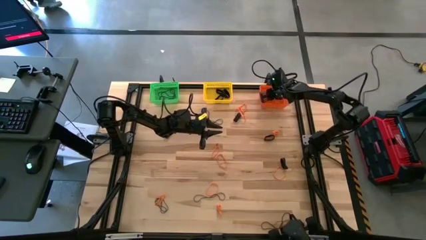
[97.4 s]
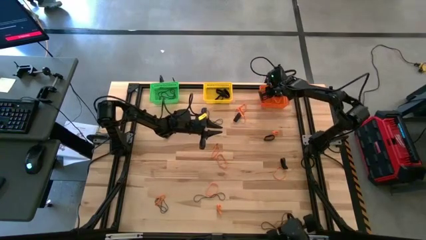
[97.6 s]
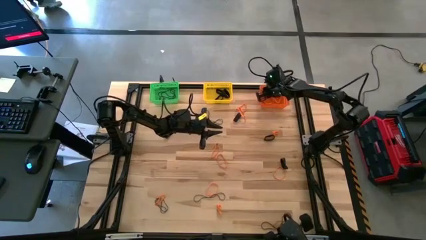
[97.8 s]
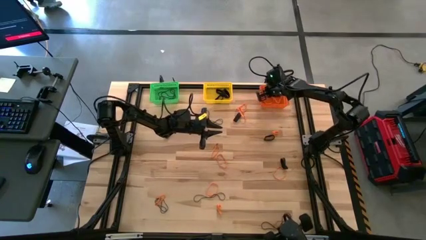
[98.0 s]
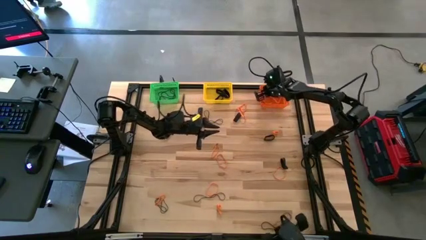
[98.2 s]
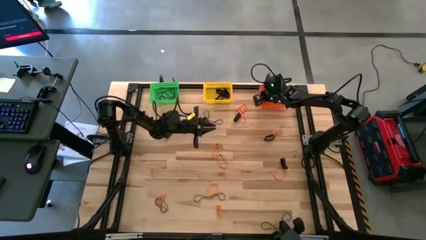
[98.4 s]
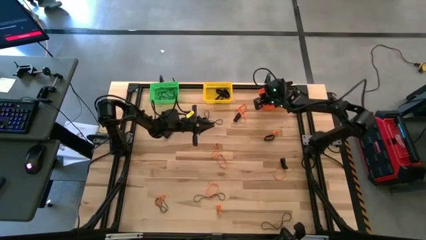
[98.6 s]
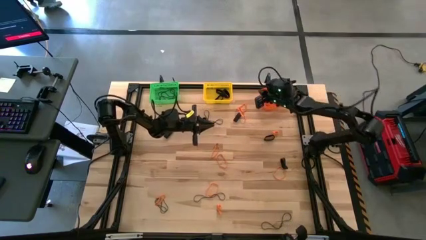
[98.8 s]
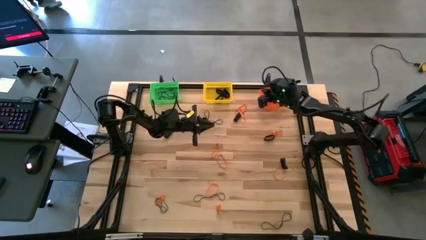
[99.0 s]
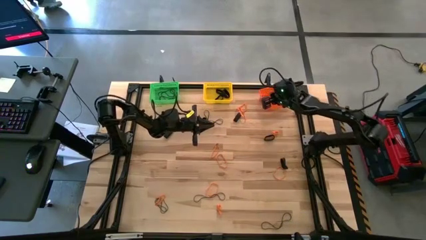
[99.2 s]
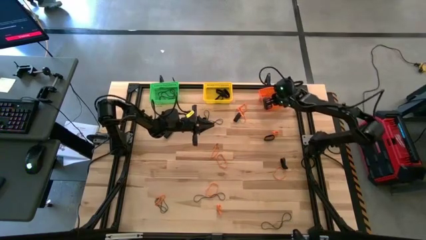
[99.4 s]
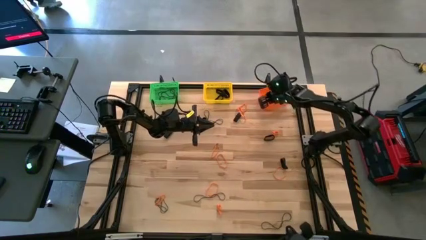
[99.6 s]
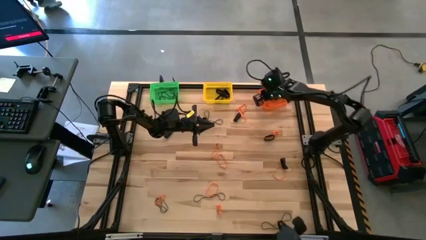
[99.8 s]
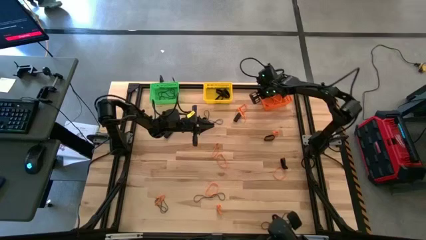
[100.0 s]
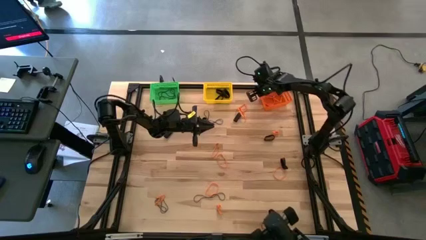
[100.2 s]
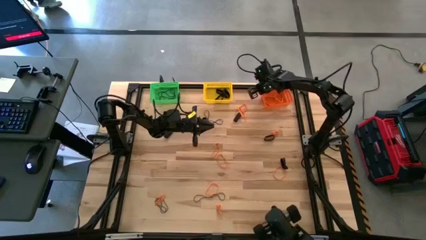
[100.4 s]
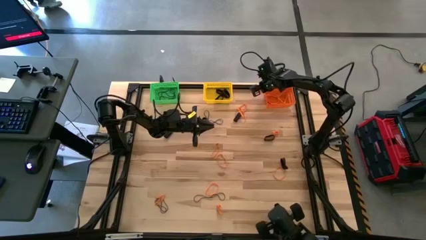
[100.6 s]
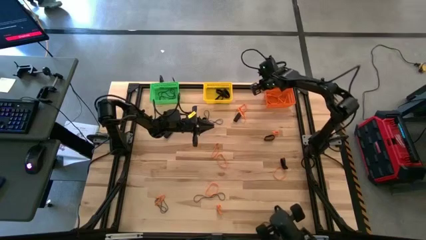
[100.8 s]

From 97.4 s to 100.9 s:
Task: Sort rubber bands into baskets
Adjust the orange bin

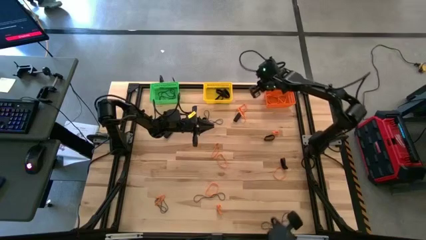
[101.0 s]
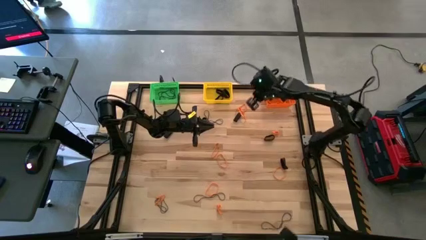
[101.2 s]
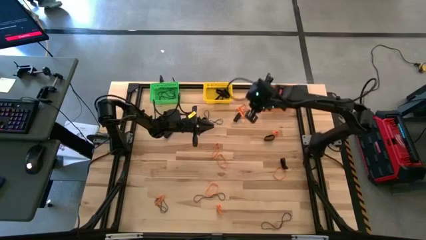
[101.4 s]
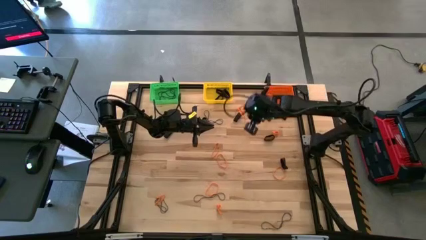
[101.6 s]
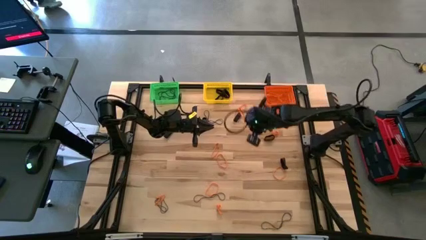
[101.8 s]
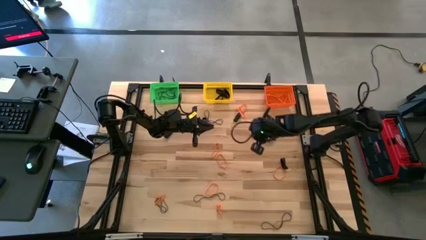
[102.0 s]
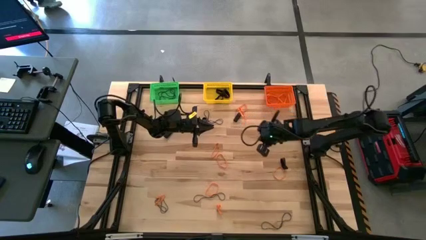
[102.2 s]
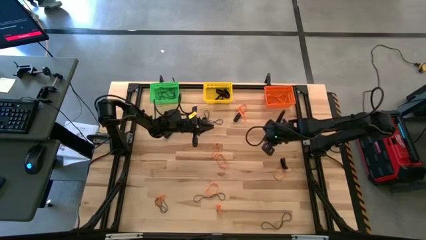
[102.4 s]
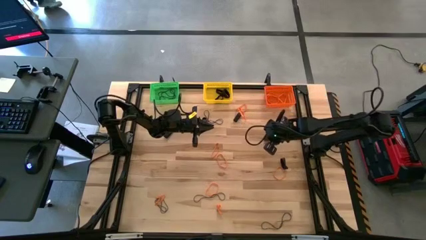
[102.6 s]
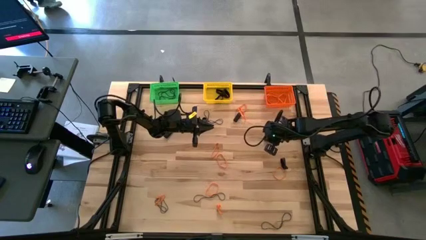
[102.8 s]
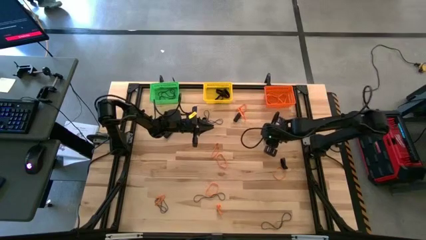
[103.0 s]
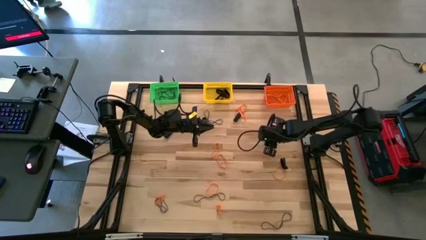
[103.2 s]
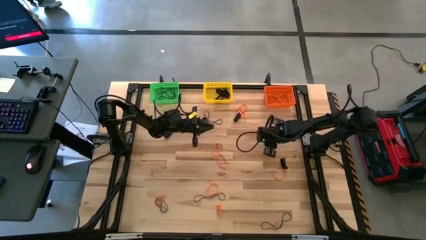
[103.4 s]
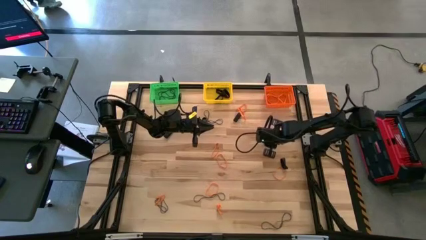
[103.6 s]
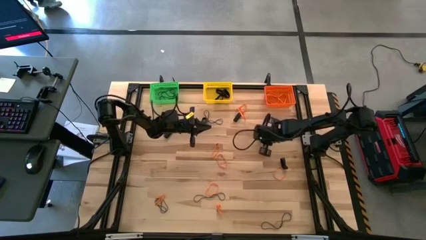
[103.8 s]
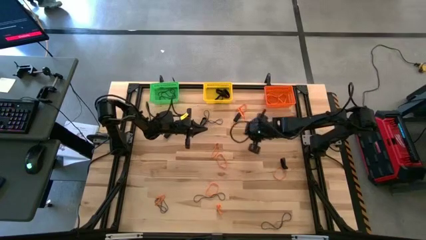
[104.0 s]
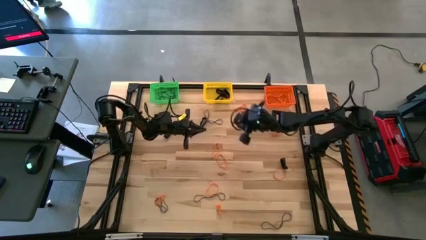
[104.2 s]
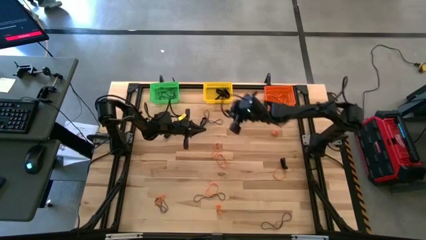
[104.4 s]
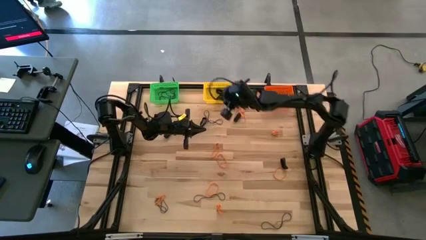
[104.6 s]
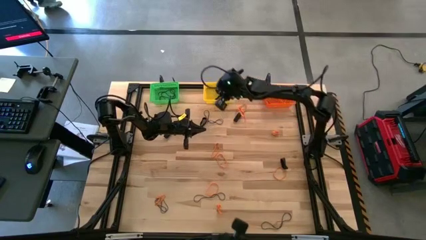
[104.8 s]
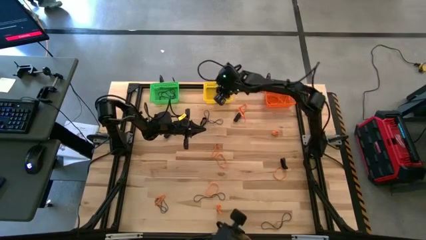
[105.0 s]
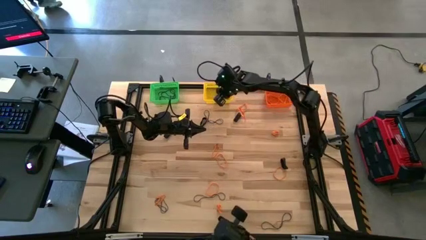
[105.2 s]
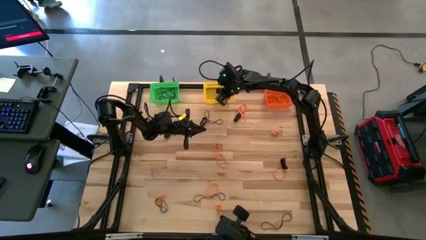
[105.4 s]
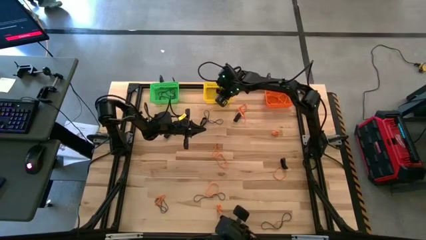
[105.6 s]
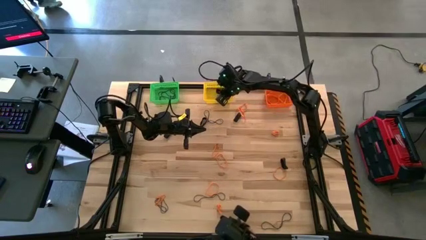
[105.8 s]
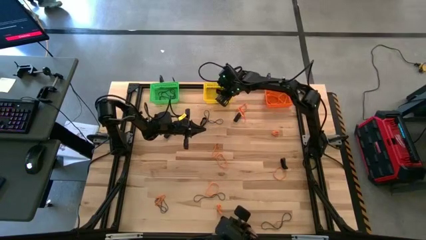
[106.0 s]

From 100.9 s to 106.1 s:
Put the black rubber band into the yellow bin

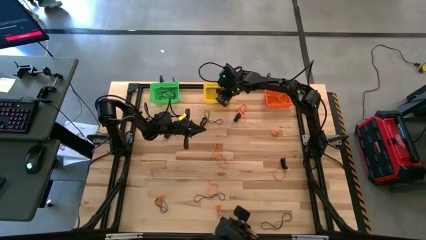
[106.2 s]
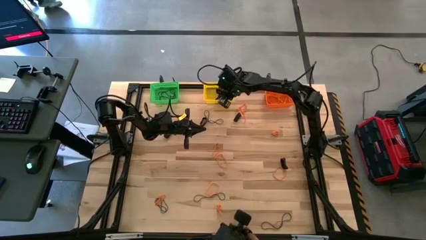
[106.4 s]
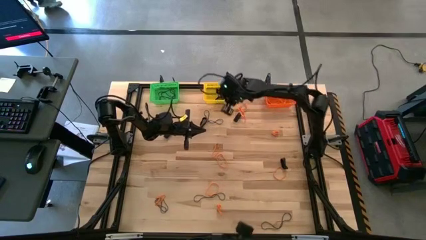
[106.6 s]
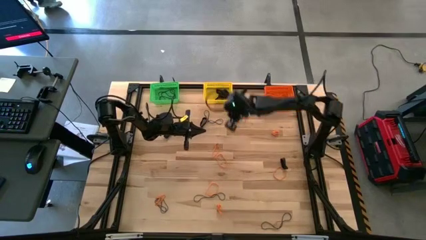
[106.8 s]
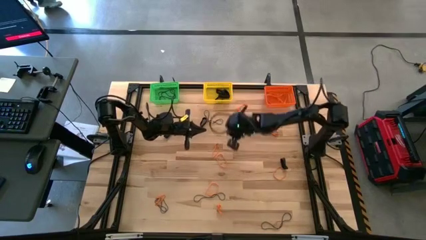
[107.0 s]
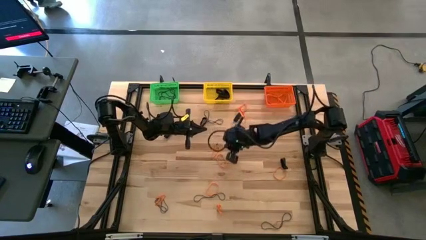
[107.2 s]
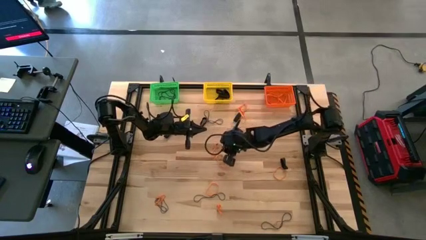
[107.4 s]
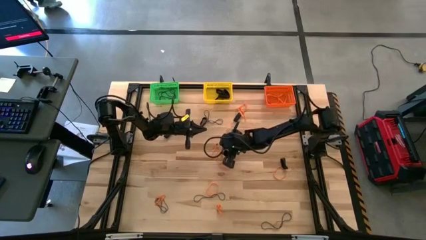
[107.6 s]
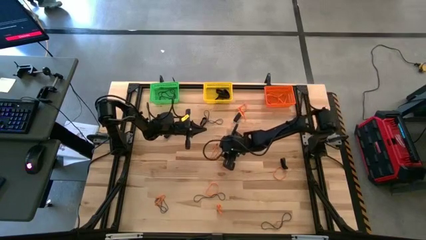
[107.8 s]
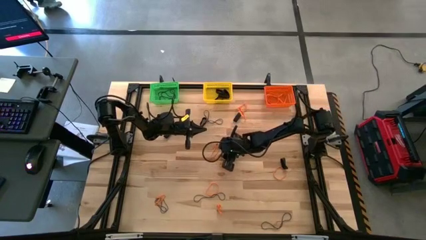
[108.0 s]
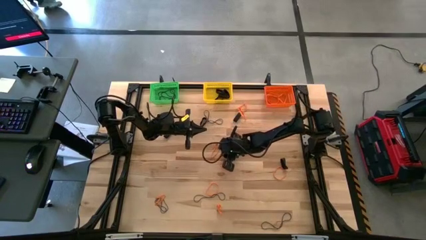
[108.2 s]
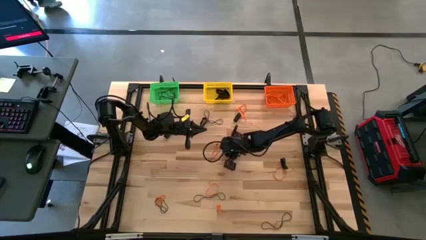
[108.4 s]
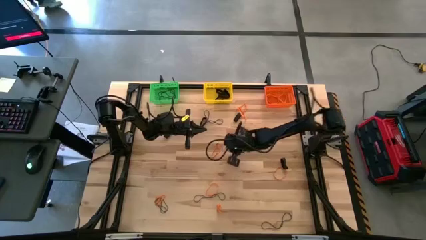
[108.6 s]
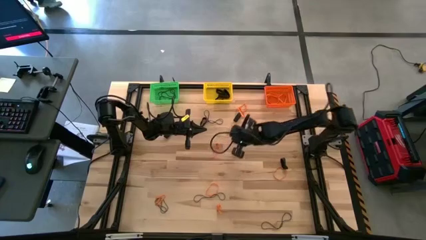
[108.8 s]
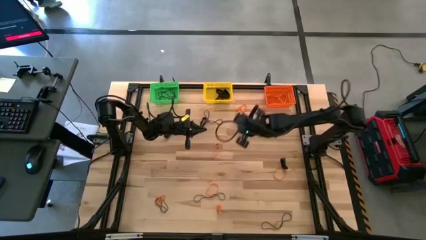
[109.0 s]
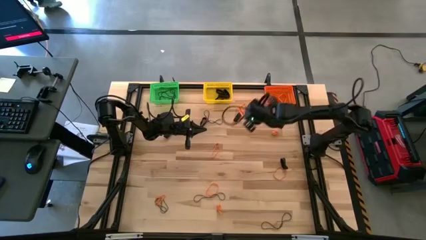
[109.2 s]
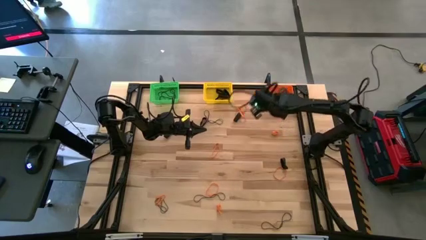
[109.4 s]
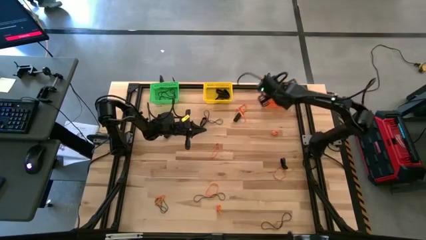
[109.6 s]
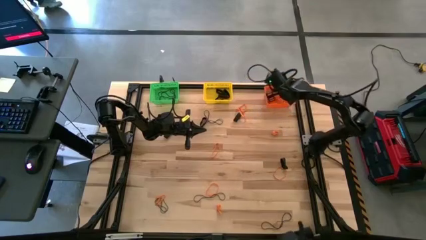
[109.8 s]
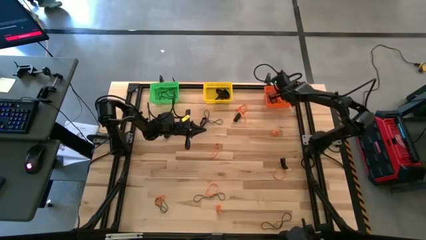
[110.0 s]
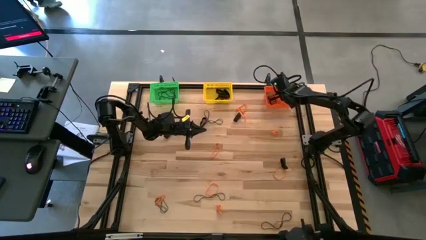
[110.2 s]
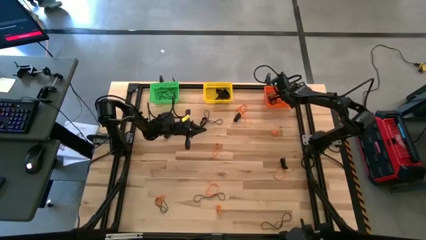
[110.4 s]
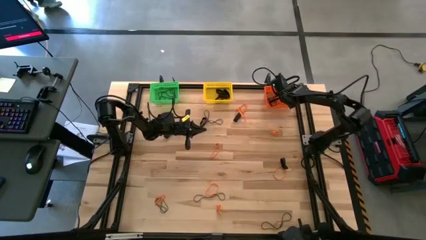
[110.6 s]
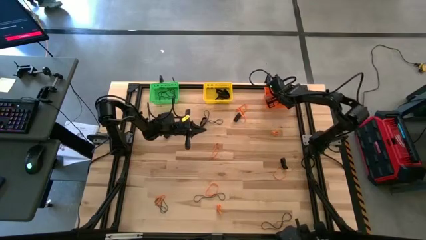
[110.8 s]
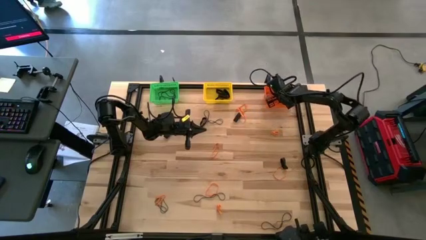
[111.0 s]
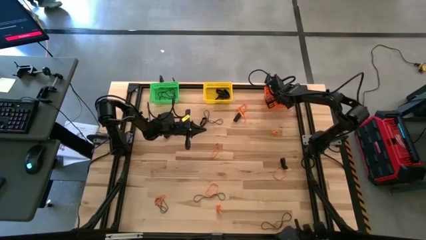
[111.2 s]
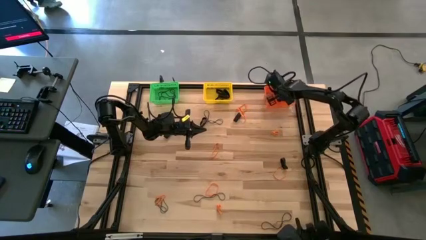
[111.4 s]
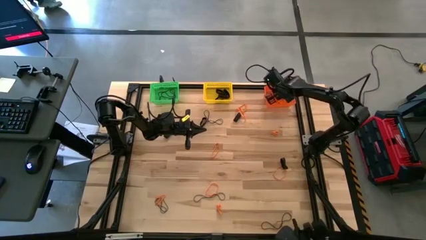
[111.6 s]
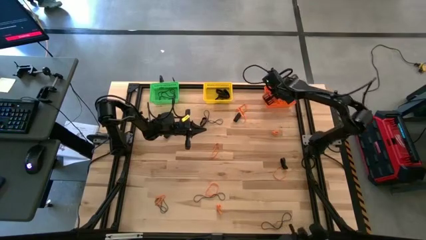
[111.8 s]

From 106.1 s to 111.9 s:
Put the orange rubber band into the orange bin
